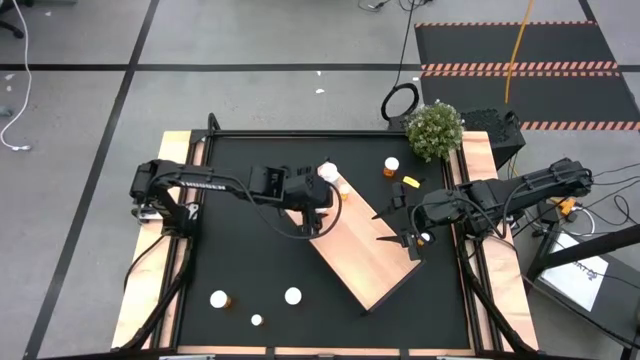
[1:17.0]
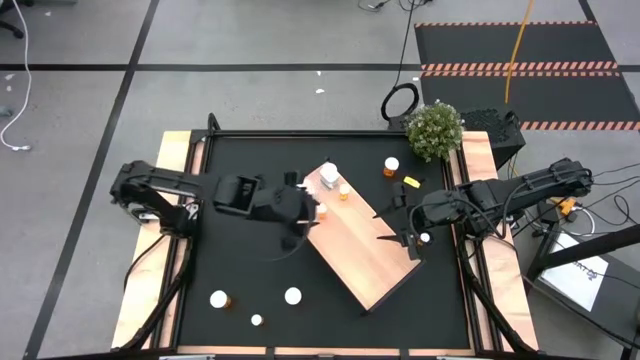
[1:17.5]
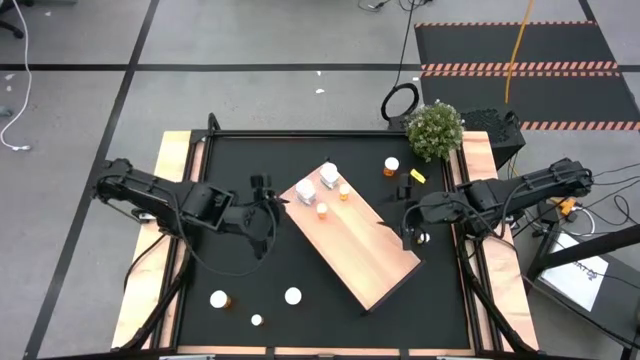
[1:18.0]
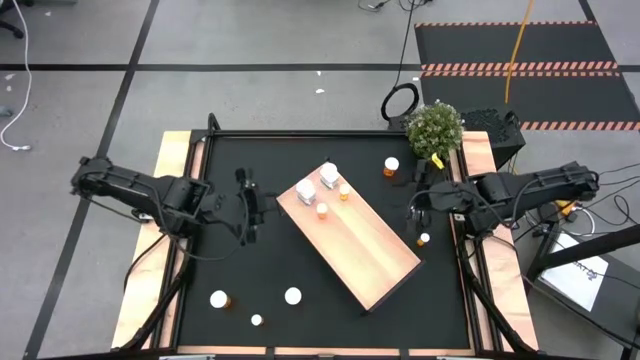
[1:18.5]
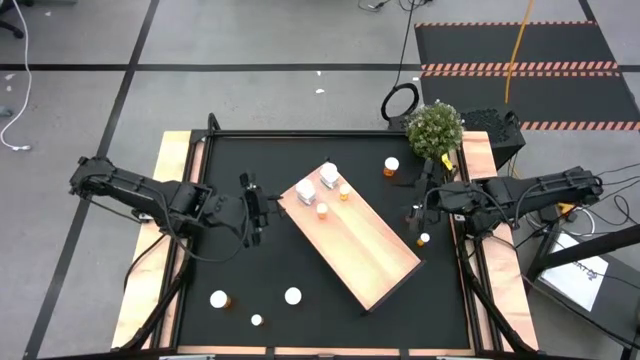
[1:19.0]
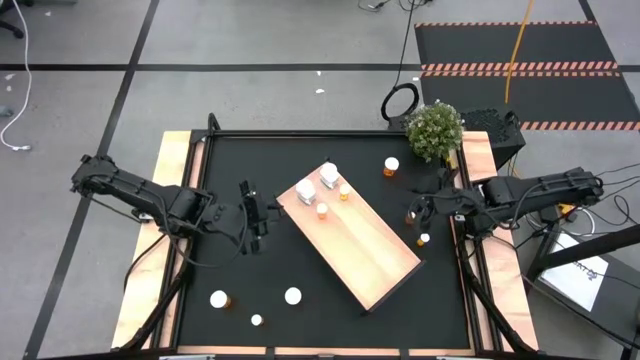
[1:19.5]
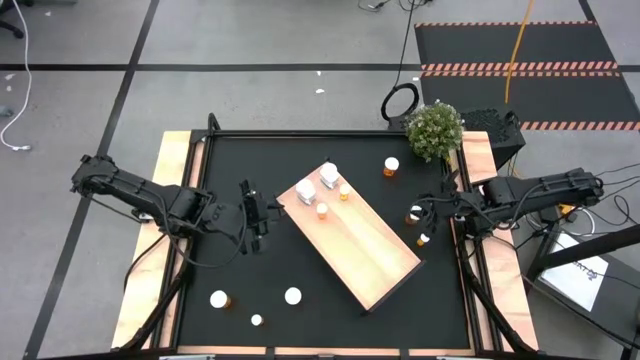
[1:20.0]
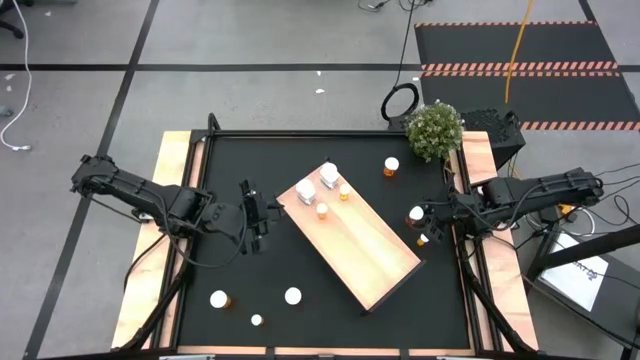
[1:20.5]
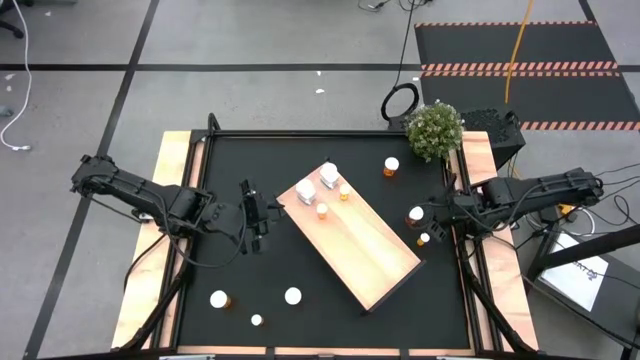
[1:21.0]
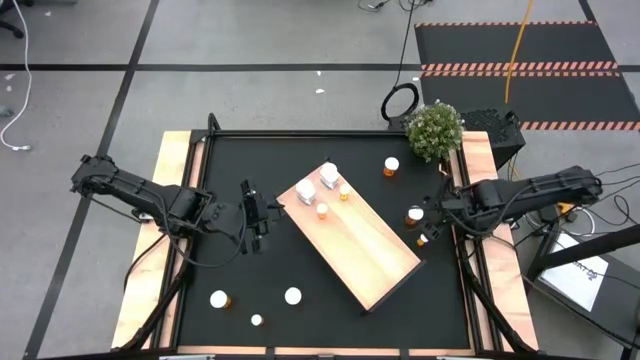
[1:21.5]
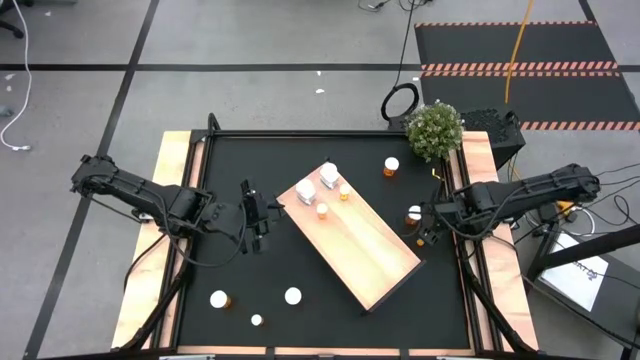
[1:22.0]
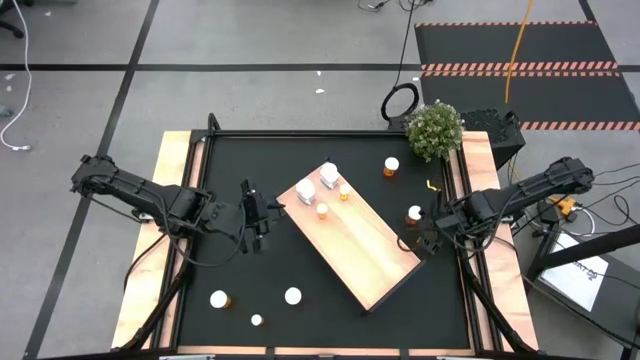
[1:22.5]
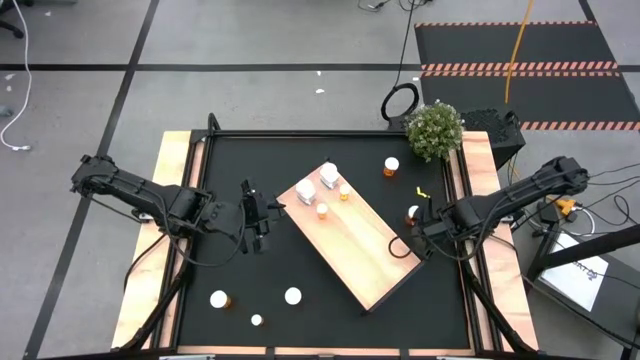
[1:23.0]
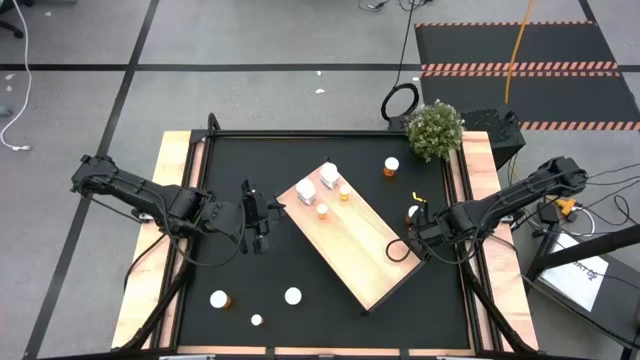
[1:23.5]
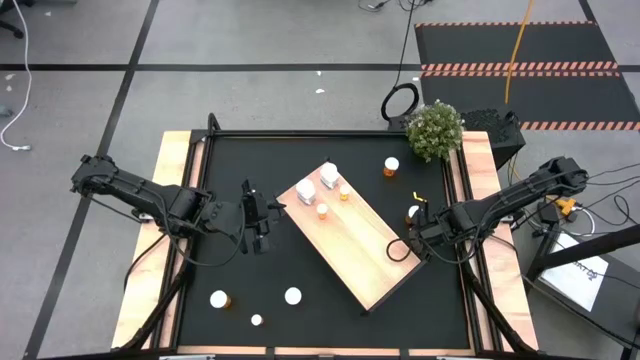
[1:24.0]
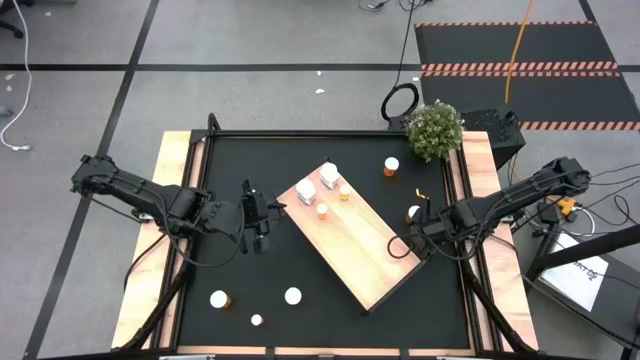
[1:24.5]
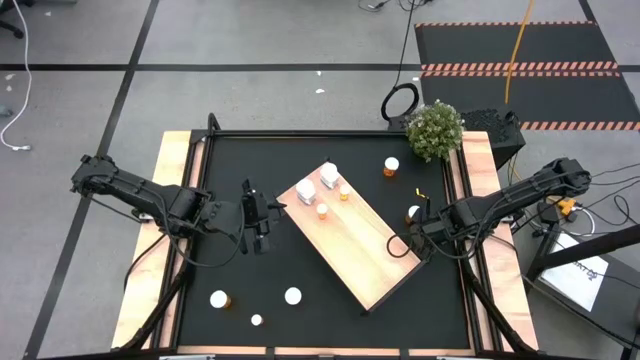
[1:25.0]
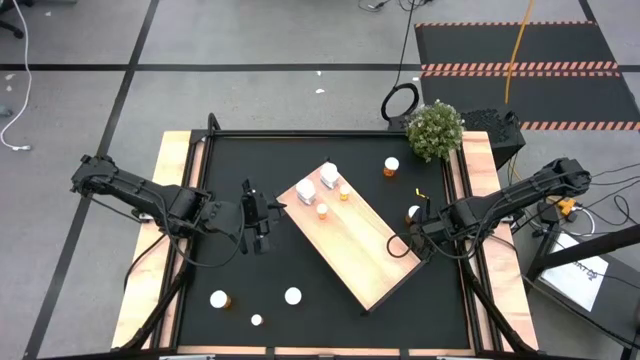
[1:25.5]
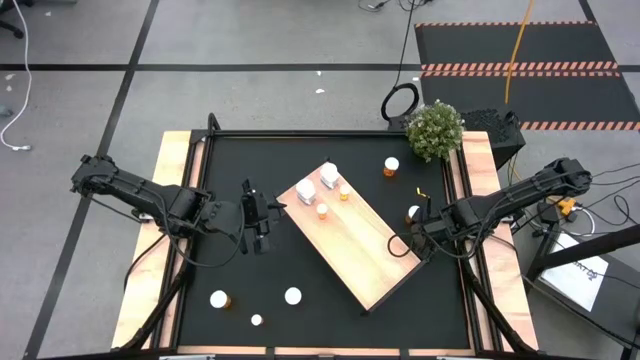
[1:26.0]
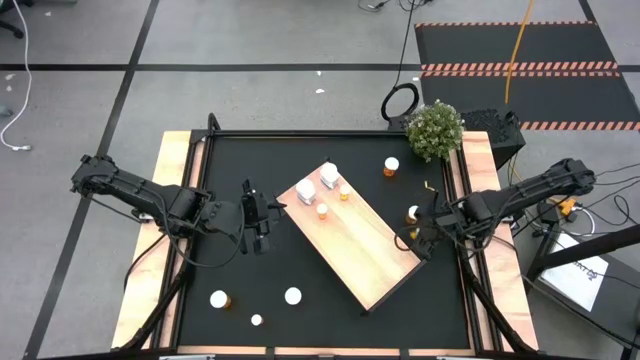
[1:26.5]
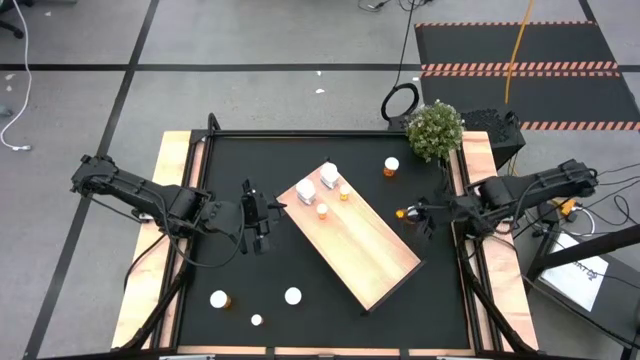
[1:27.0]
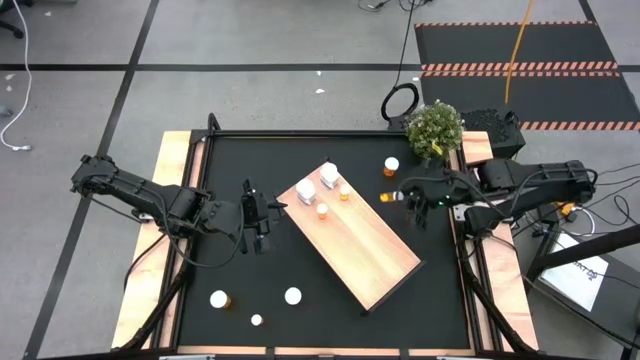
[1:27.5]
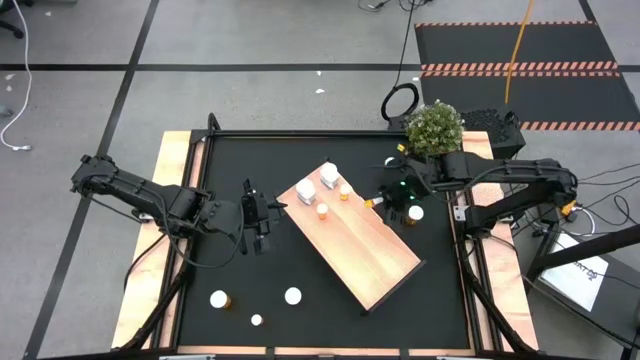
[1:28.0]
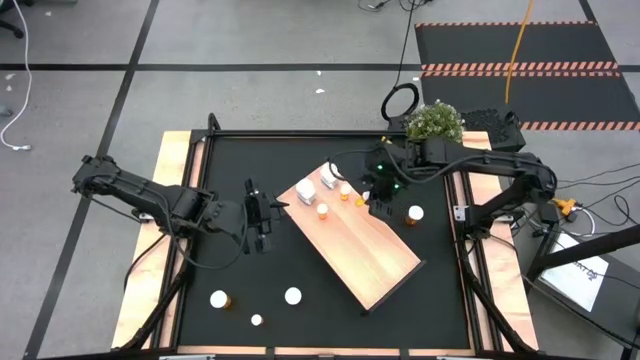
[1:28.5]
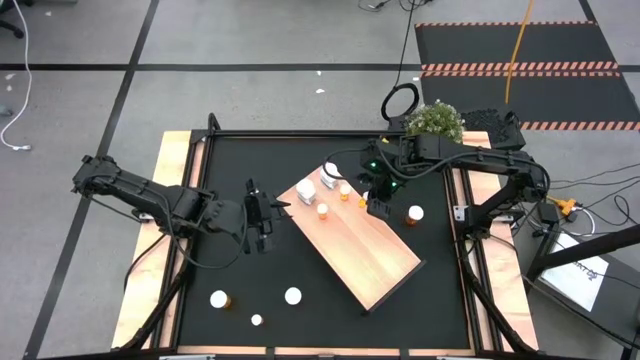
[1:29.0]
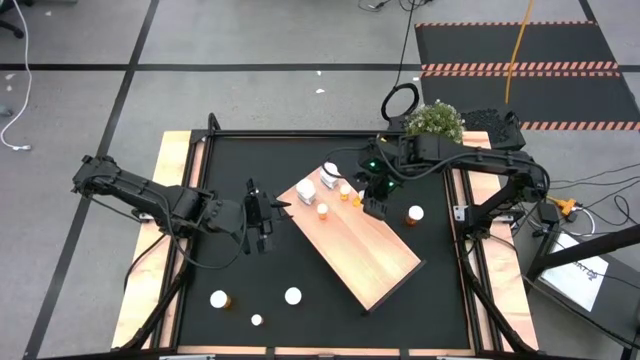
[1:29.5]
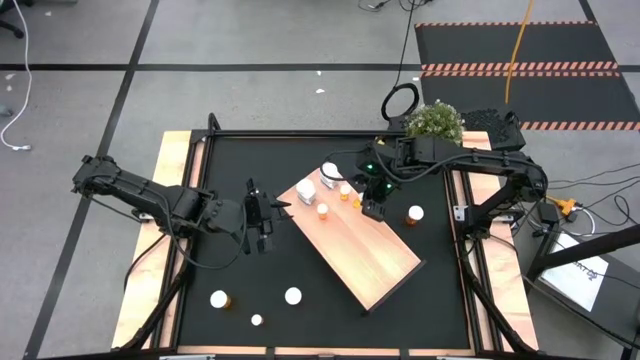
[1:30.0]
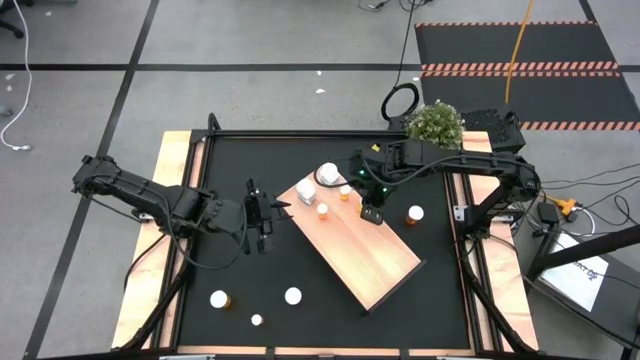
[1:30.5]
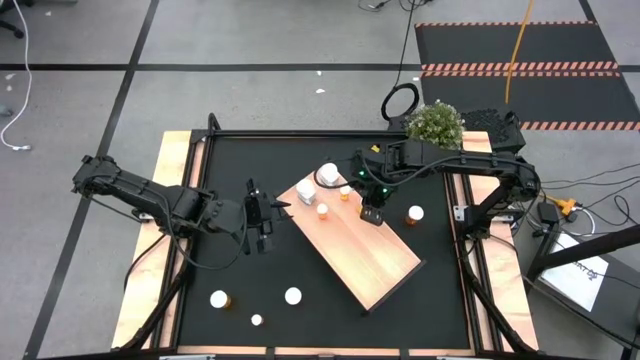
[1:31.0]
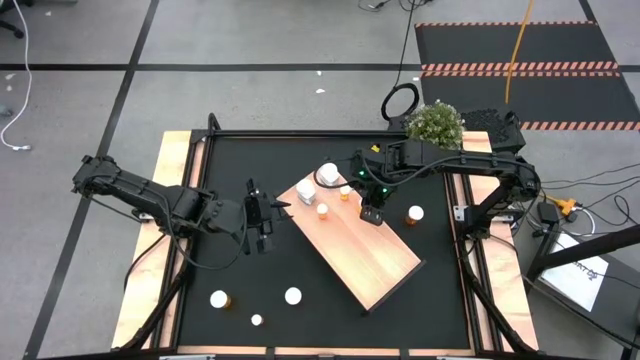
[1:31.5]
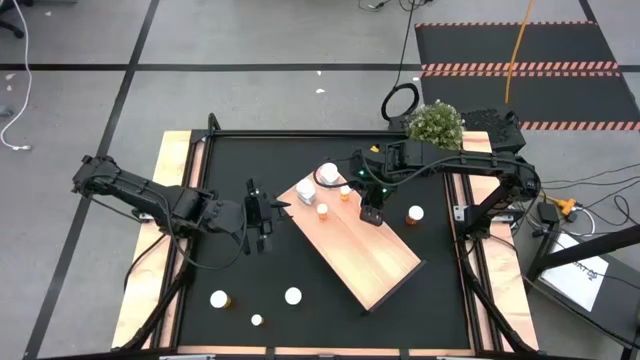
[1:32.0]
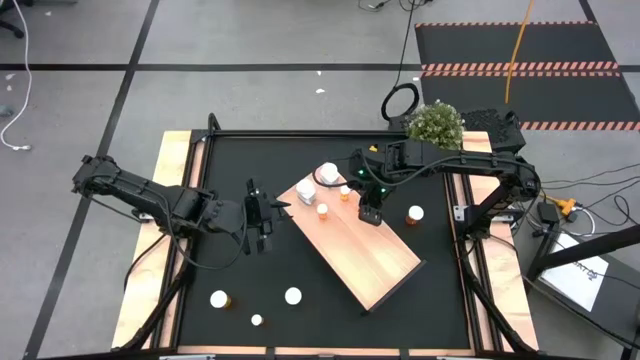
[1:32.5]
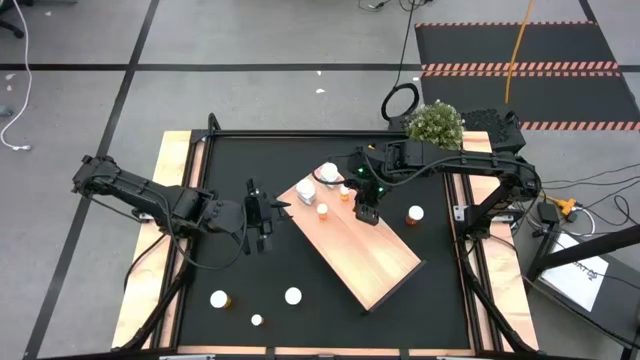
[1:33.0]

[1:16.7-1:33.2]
Task: Pick and place medicine bottles onto shelf by color
Put the small orange pill bottle on the shelf

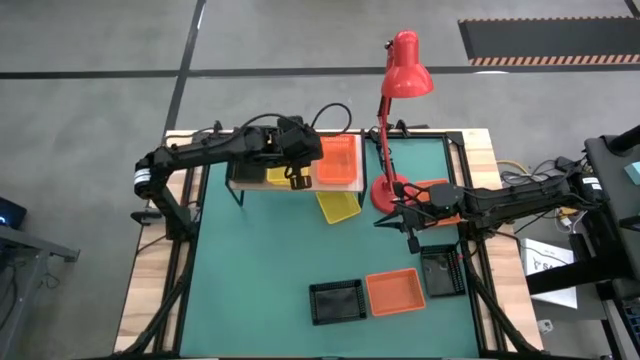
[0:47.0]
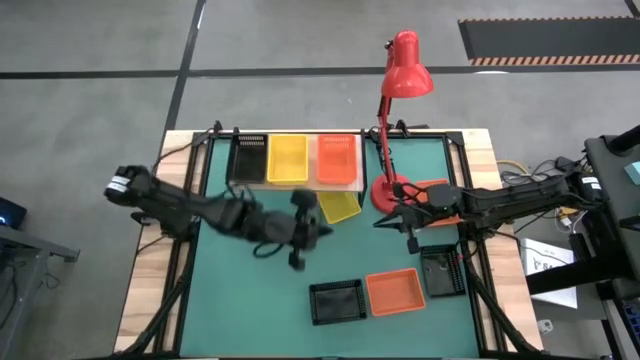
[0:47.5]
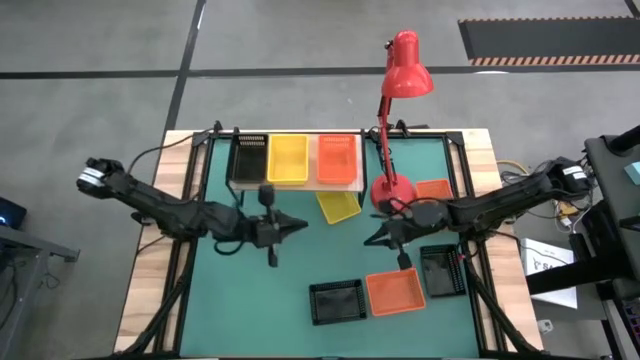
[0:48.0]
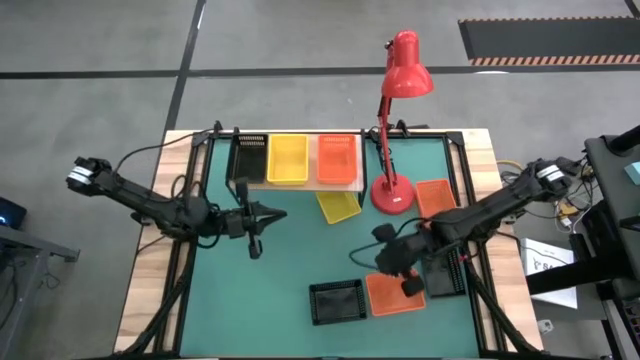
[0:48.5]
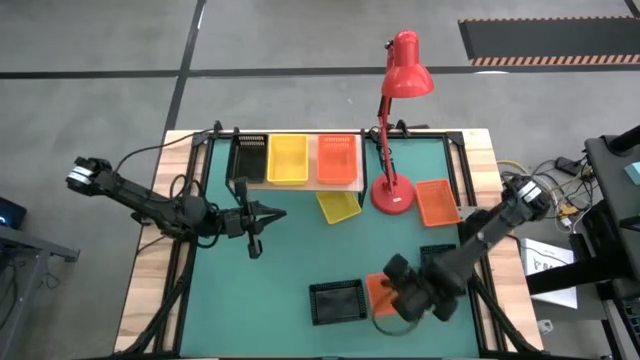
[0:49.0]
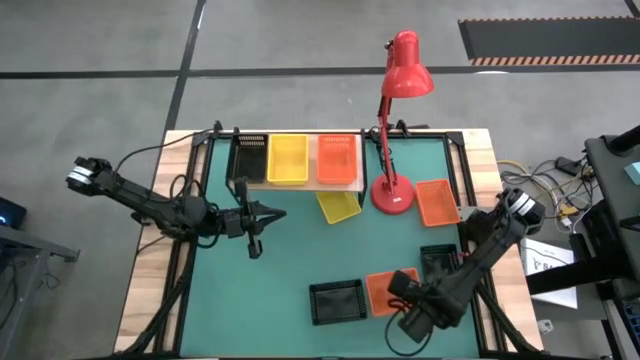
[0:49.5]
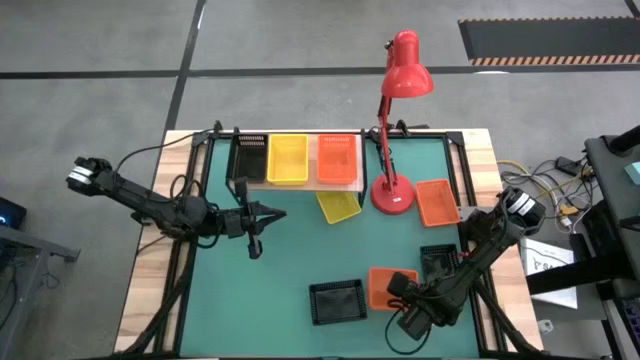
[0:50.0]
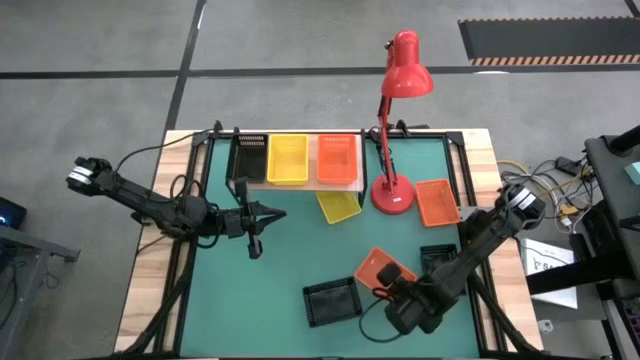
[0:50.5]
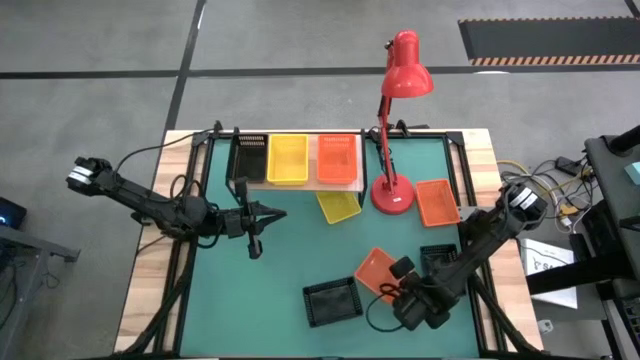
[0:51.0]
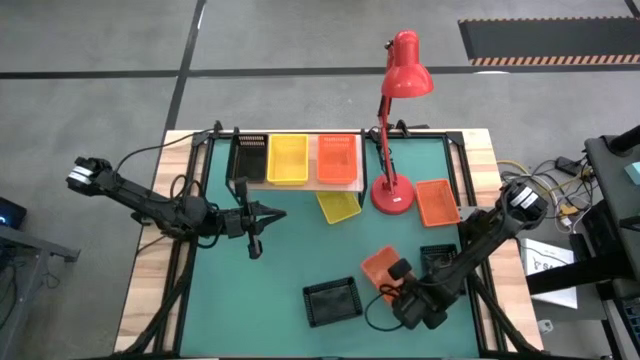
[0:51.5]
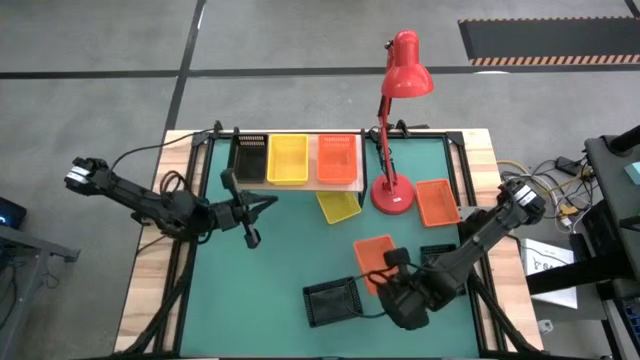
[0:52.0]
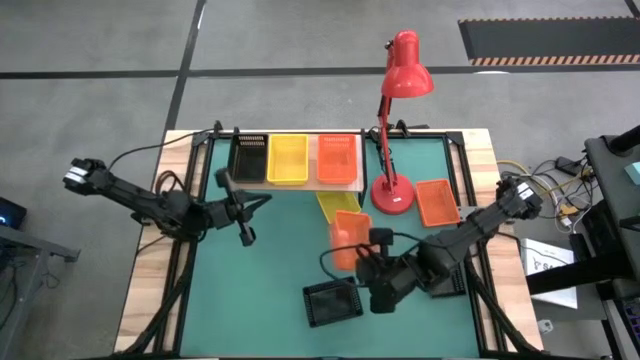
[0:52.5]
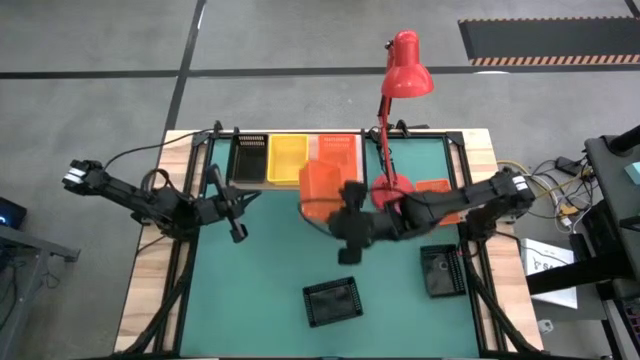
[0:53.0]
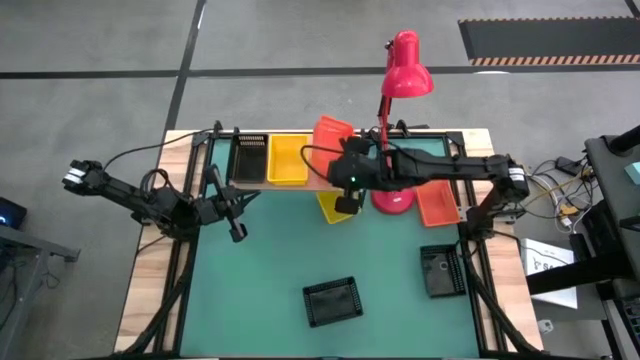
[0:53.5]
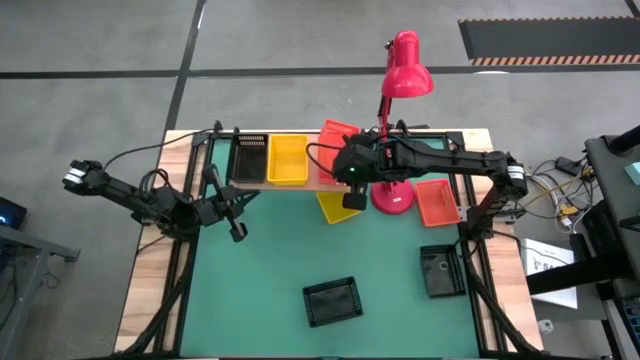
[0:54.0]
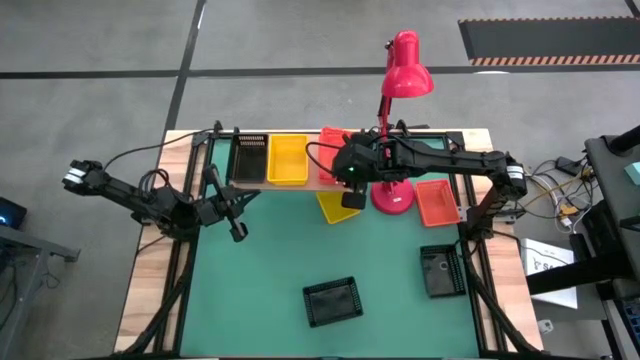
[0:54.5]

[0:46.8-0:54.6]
Task: Stack baskets on shelf by color
Stack the bottom orange bin on top of the orange bin on the shelf
